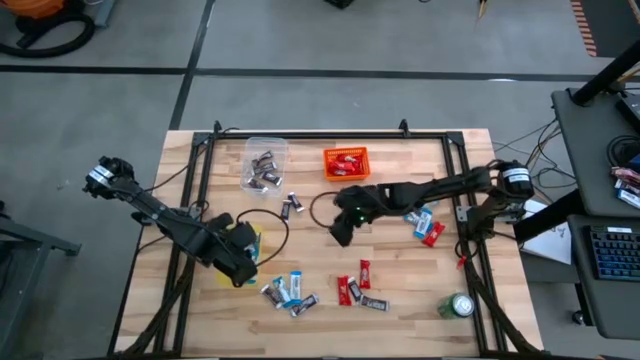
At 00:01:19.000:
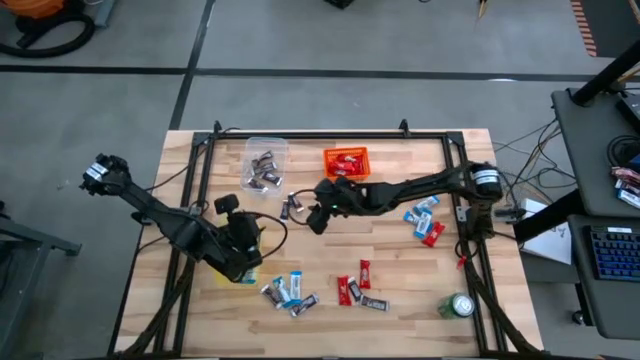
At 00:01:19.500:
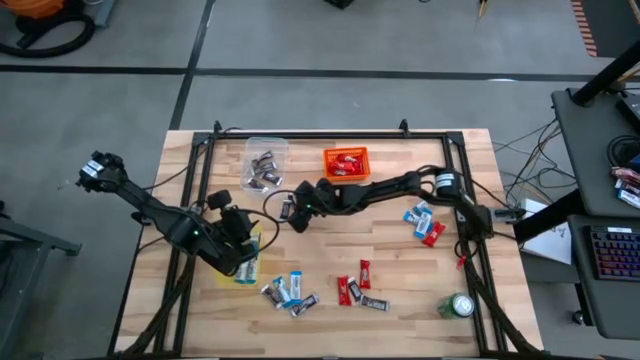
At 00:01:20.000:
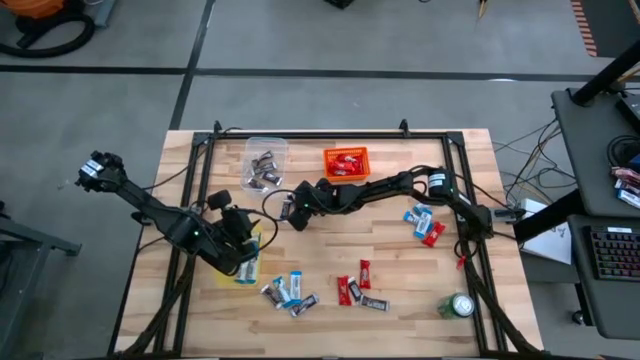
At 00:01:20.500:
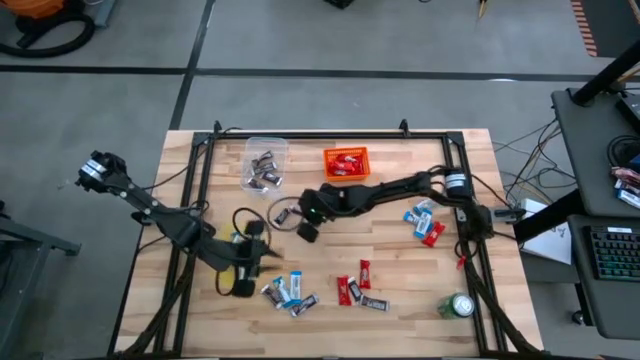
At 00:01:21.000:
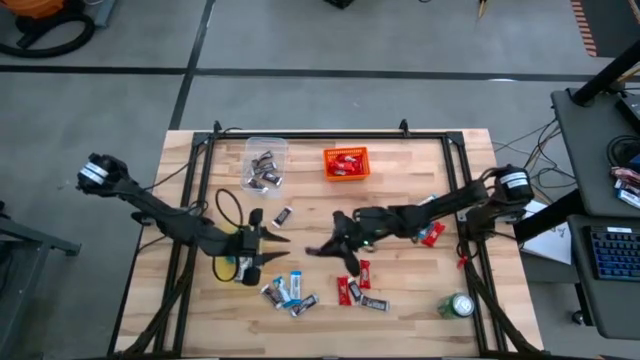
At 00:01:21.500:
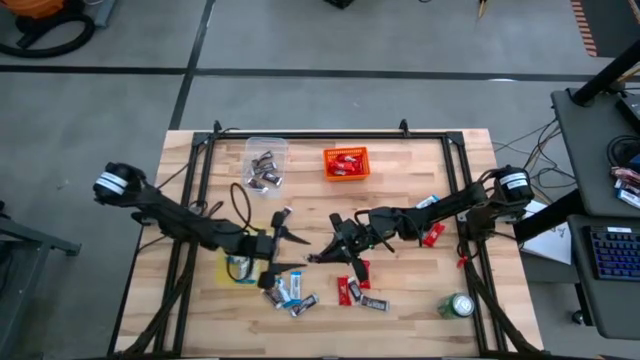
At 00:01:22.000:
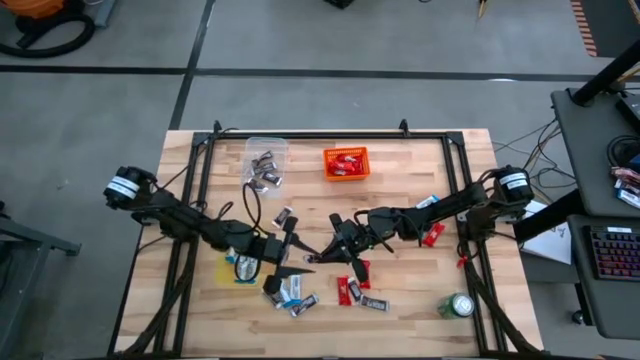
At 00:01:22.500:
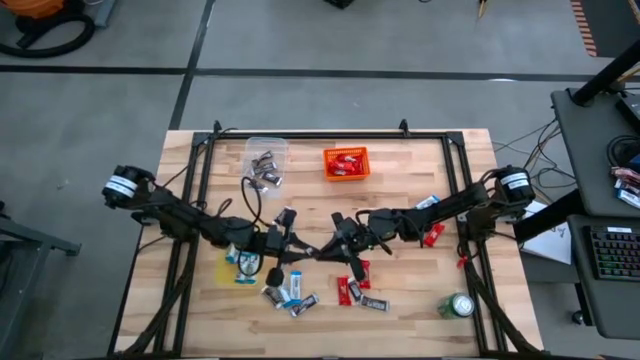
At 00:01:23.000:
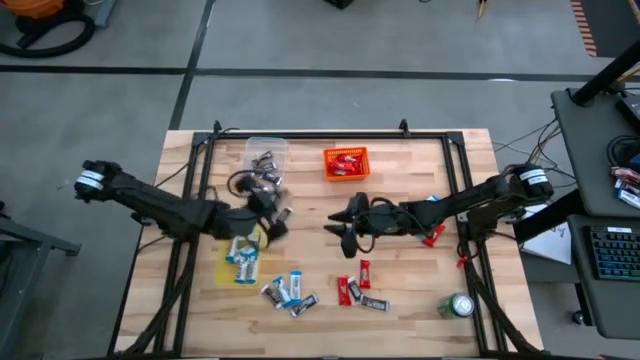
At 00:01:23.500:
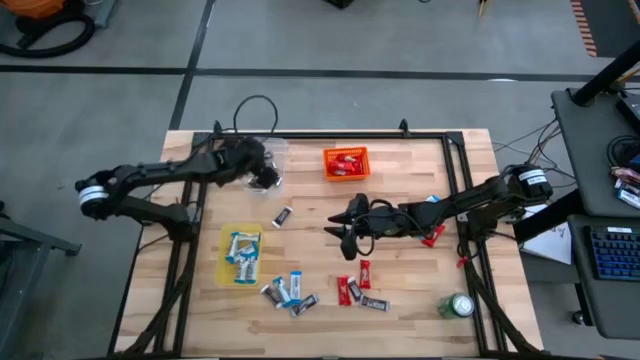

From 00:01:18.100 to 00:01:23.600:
Task: Sort candy
Put the top left brown candy into the transparent bin

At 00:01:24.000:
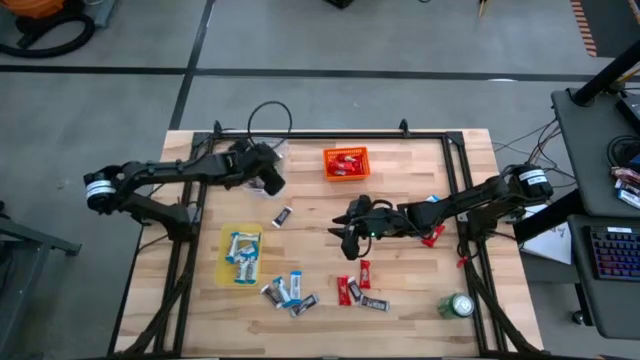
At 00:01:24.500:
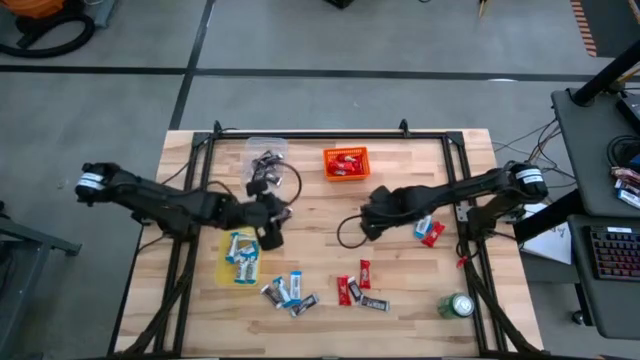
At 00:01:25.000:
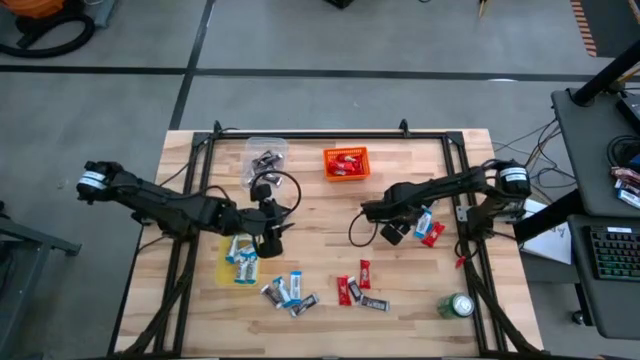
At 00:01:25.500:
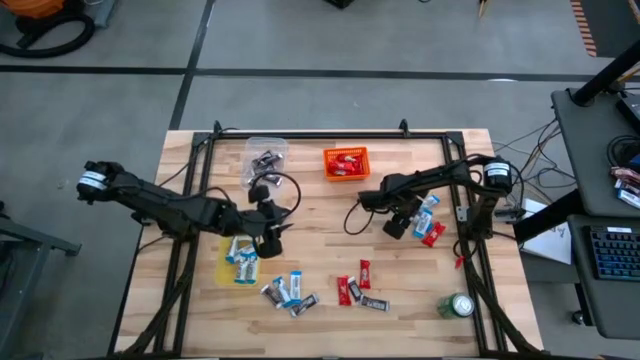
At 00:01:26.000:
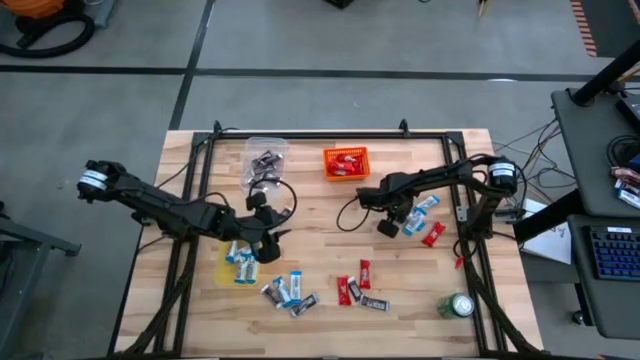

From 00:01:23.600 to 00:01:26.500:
Put the middle right white candy into the yellow bin

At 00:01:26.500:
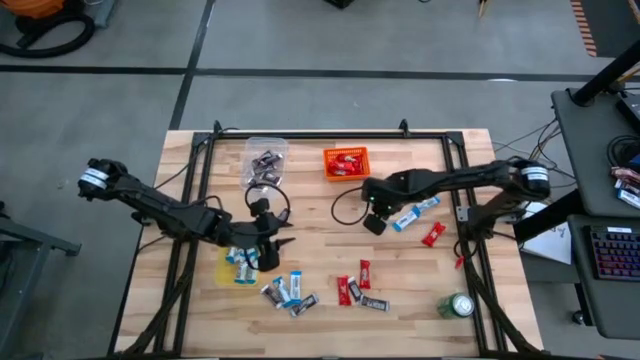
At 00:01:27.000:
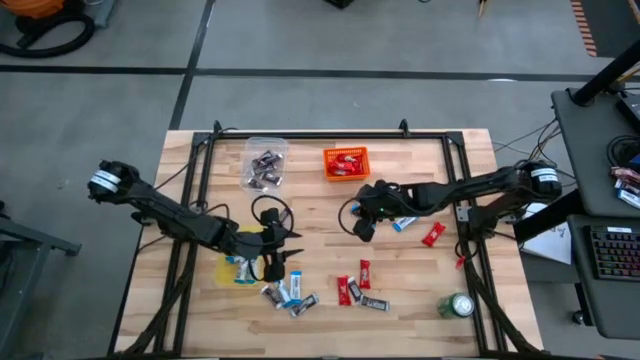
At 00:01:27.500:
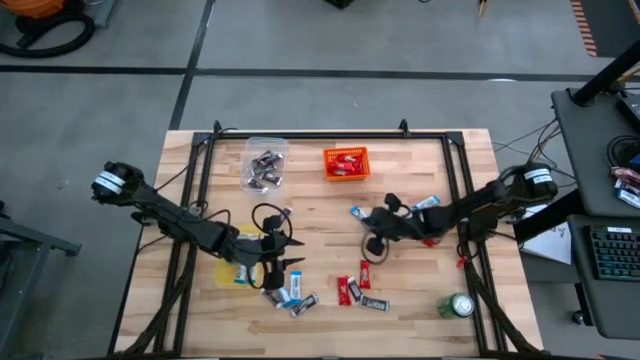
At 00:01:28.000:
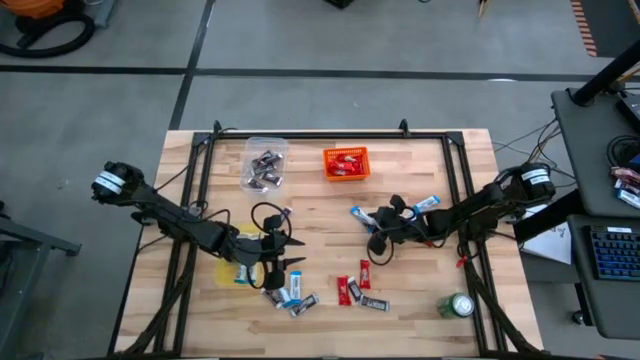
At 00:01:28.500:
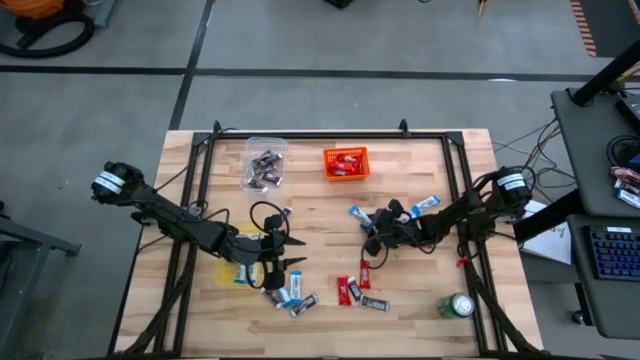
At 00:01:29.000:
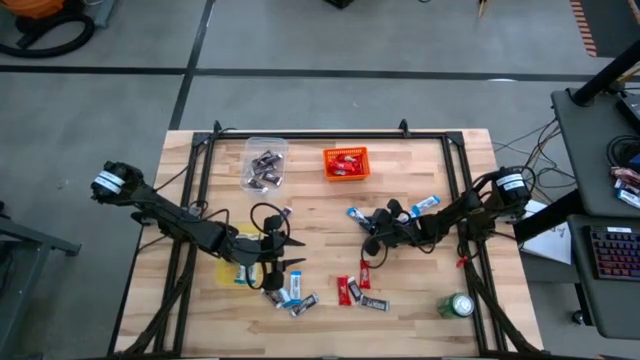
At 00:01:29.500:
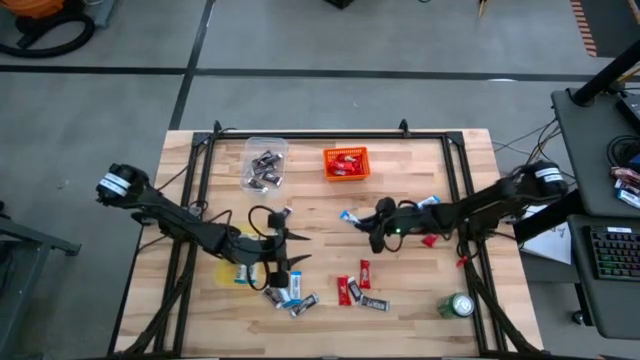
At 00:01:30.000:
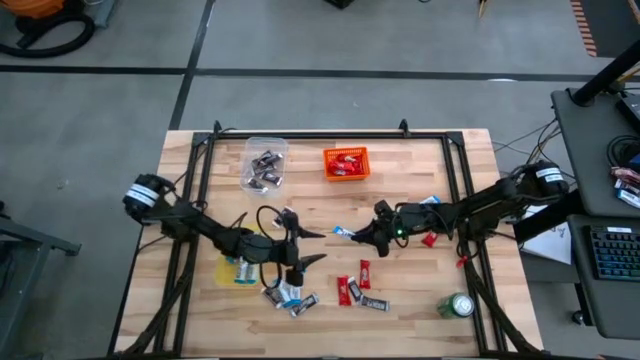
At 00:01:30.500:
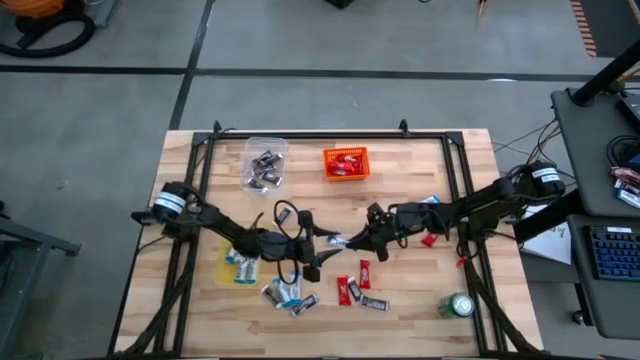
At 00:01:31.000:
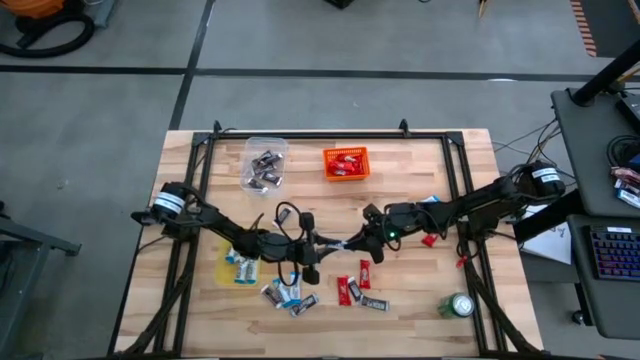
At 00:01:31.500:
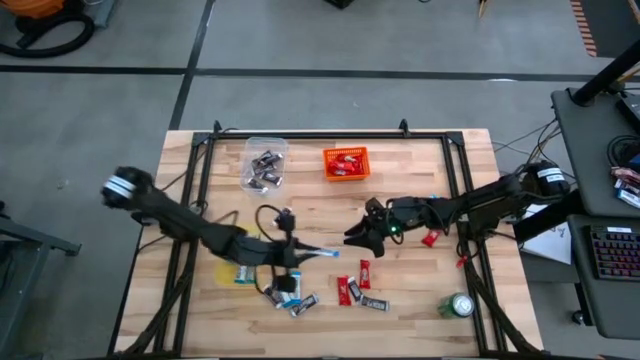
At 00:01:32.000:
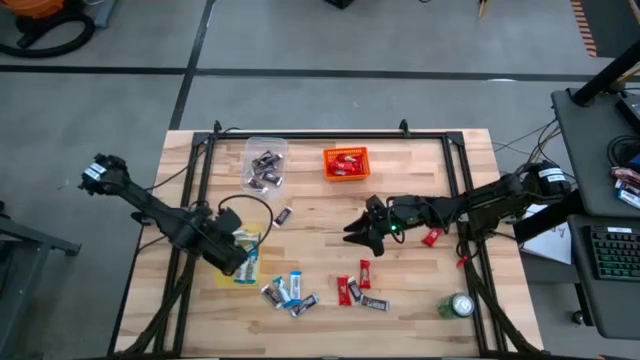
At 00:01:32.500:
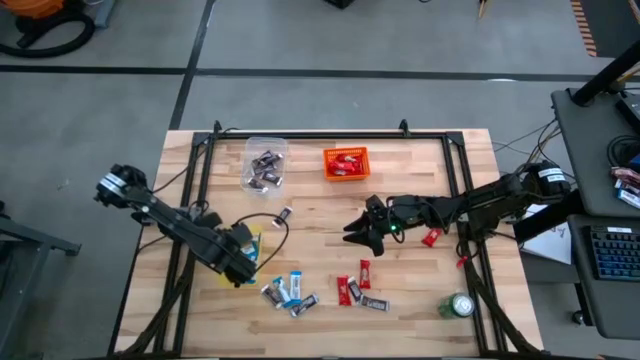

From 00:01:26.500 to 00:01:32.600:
Put the middle right white candy into the yellow bin

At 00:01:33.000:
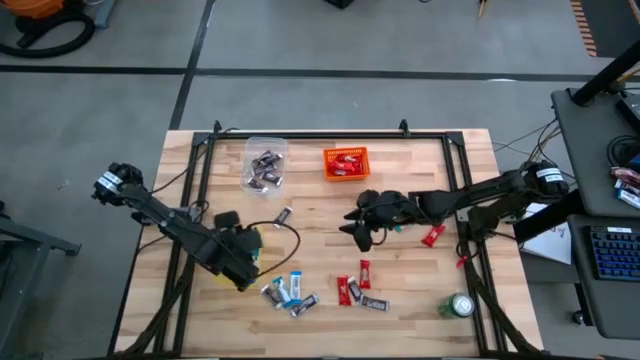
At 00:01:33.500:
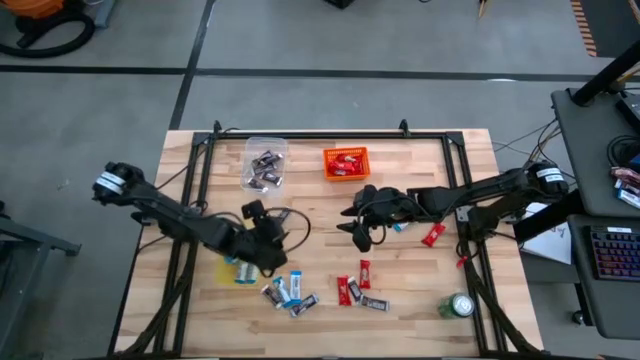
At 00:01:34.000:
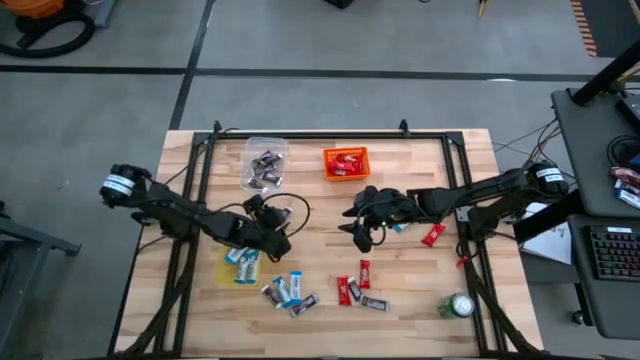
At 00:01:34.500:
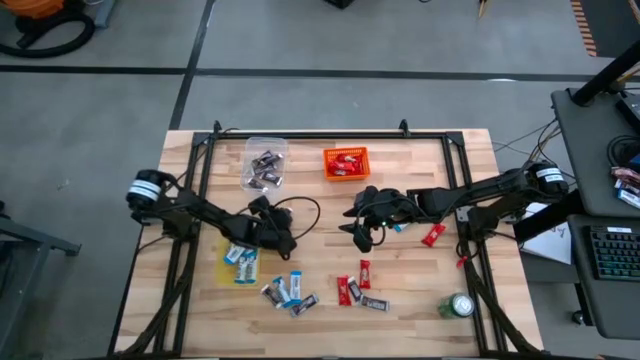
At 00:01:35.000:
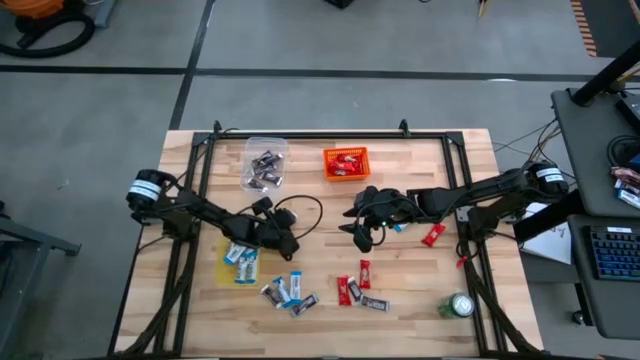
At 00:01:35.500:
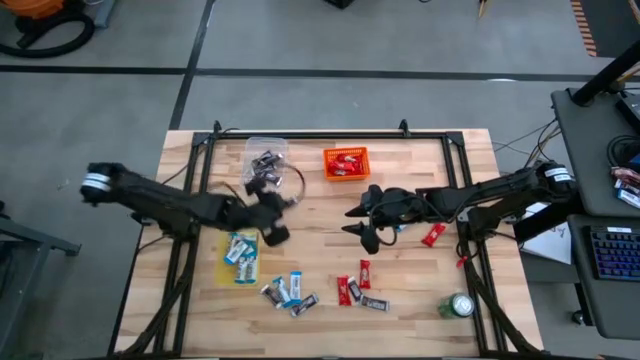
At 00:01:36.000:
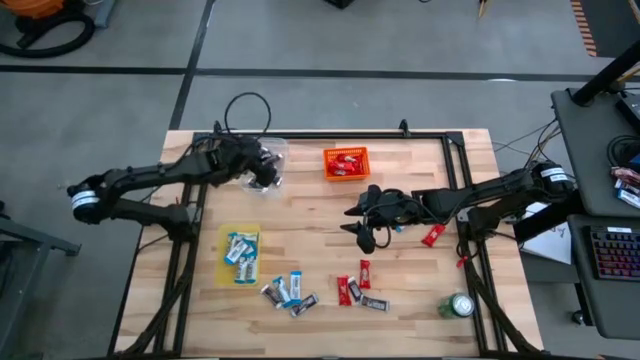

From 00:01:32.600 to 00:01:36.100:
Put the middle left brown candy into the transparent bin

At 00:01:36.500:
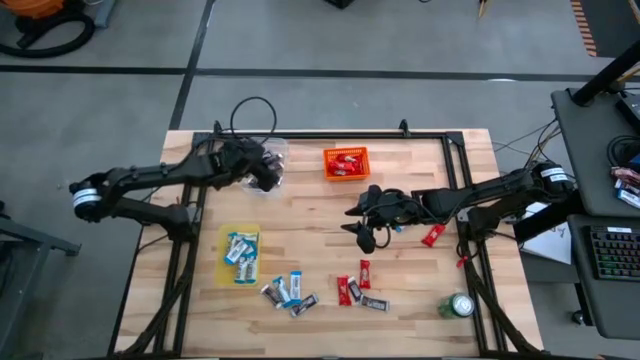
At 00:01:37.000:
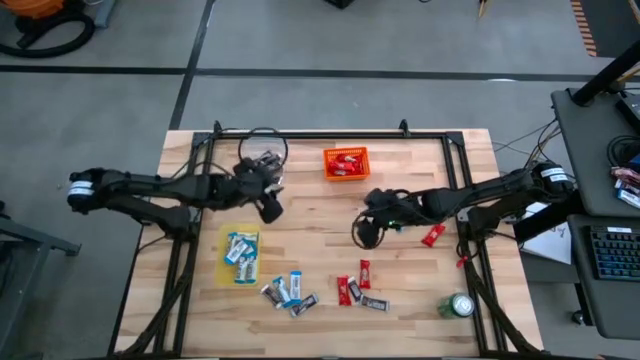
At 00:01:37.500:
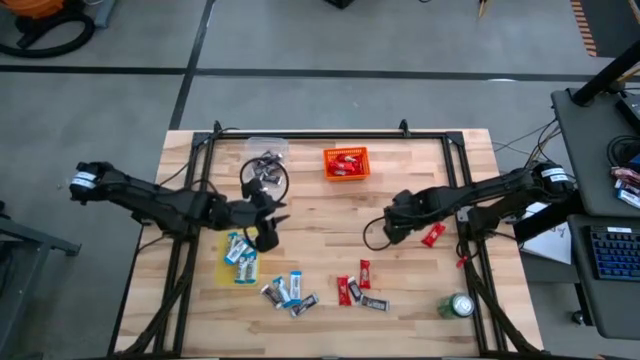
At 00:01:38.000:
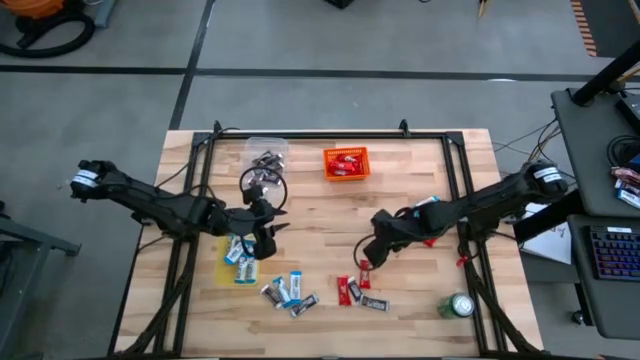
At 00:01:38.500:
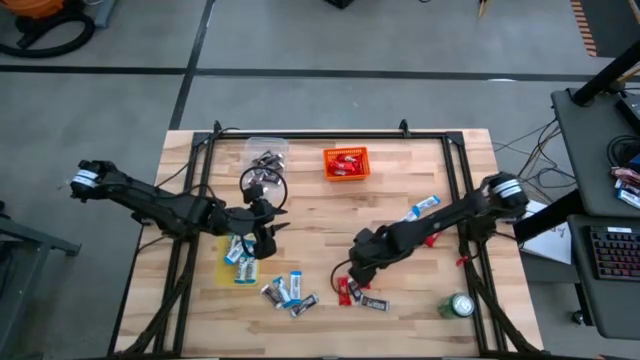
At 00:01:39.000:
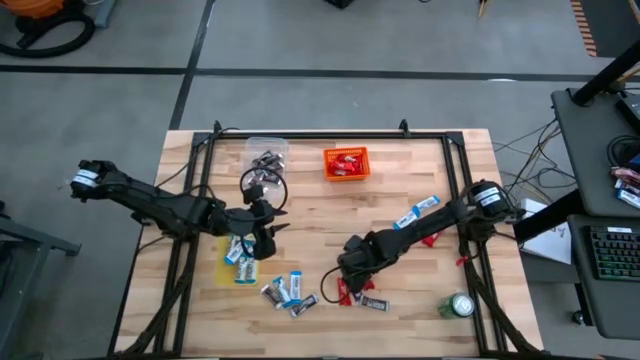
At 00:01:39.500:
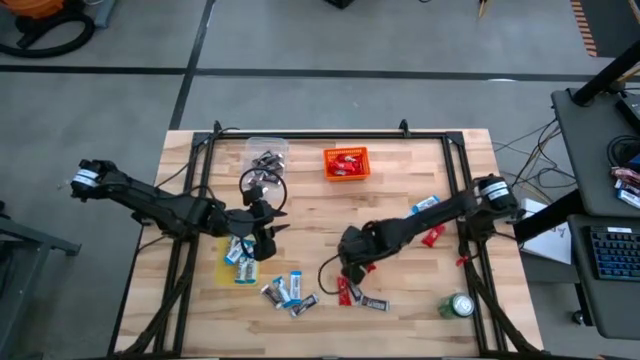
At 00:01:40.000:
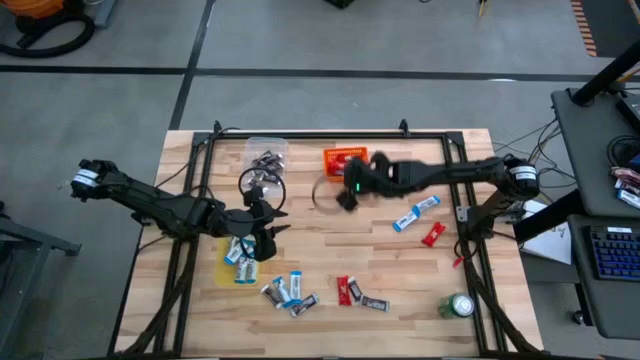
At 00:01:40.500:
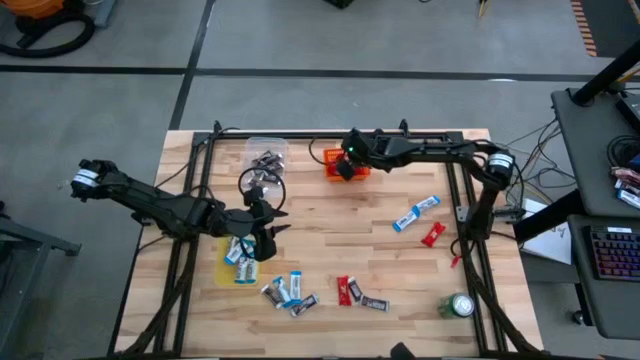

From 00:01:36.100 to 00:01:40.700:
Put the bottom center red candy into the orange basket
